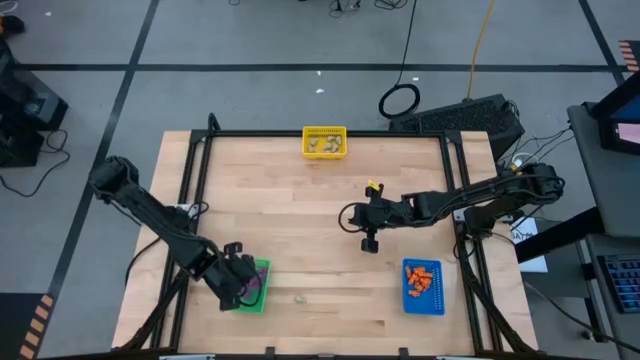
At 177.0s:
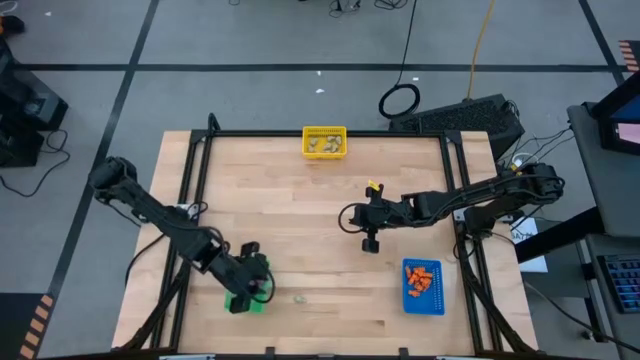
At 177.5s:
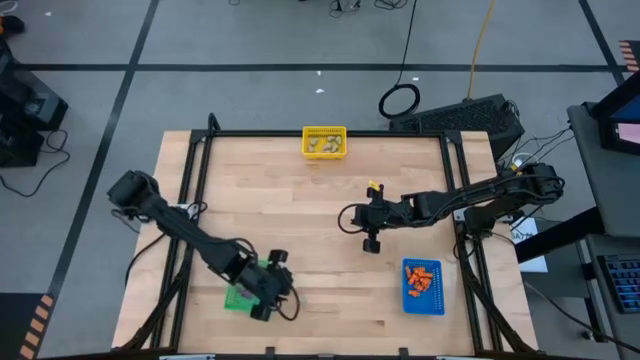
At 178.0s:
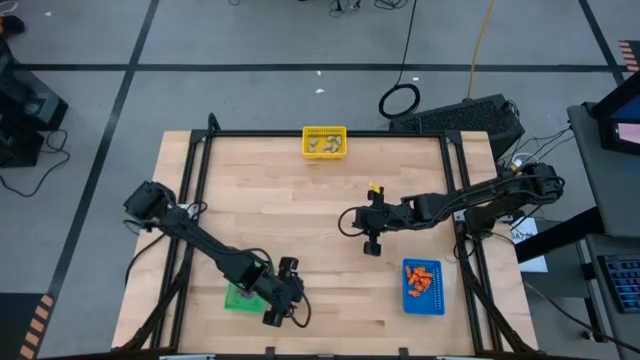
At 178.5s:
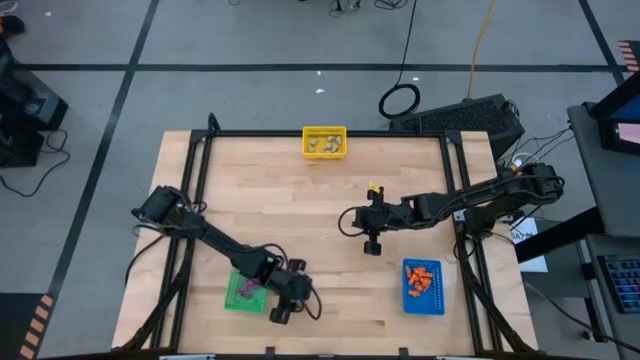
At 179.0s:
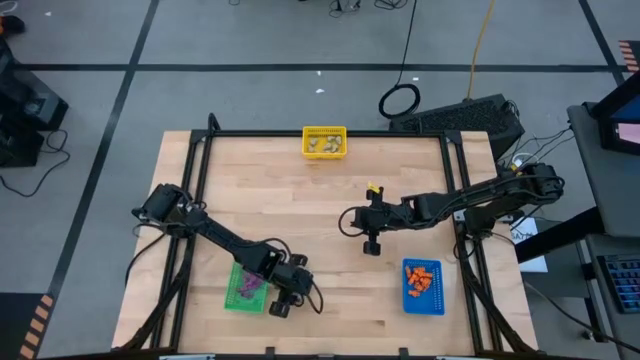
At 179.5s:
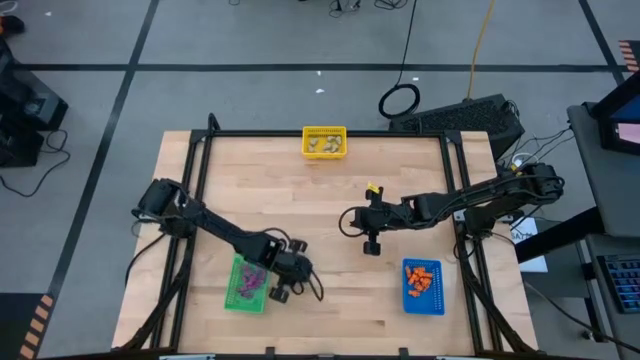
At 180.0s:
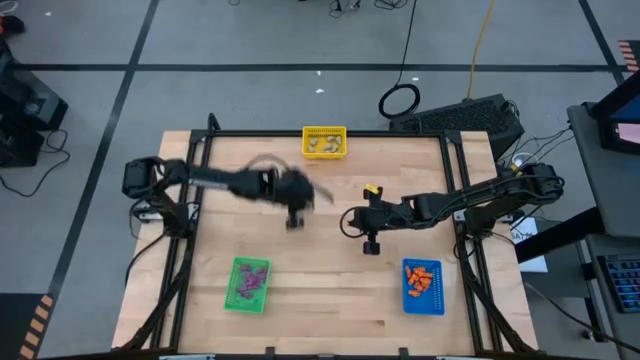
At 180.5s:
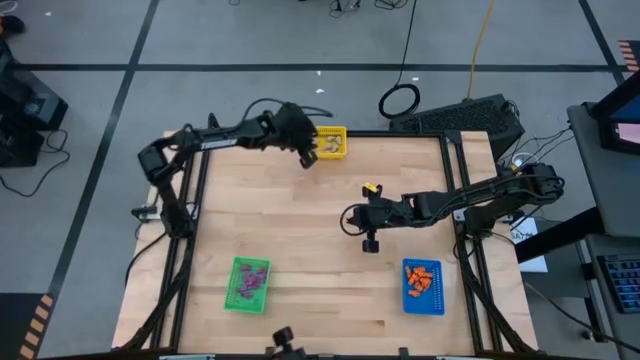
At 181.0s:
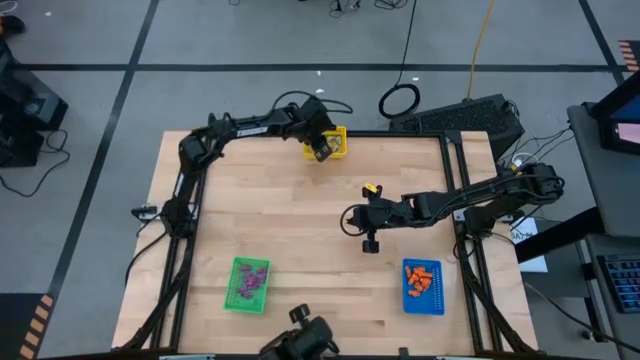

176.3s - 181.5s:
Task: Sort Halloween decoration
Put the gray skull toy into the yellow bin

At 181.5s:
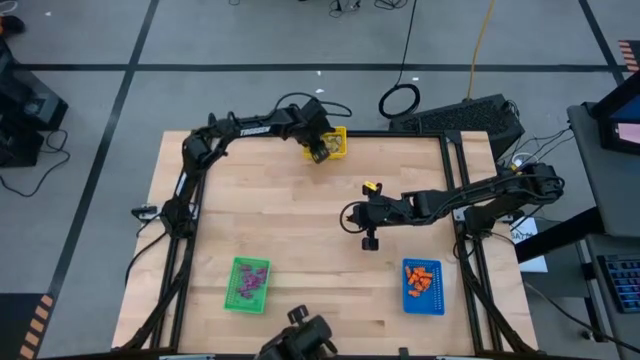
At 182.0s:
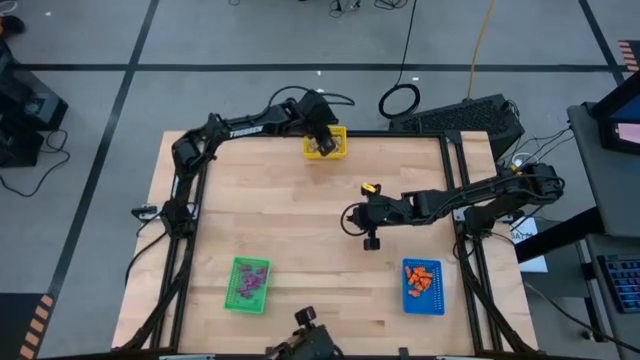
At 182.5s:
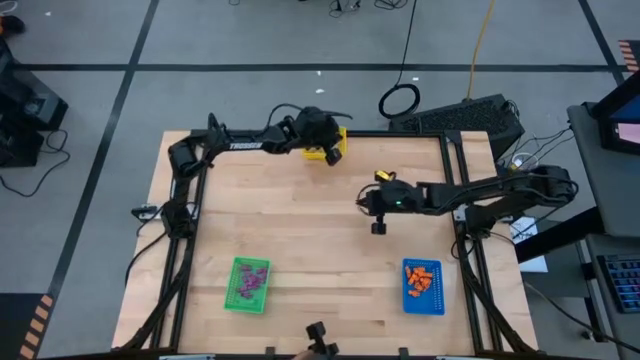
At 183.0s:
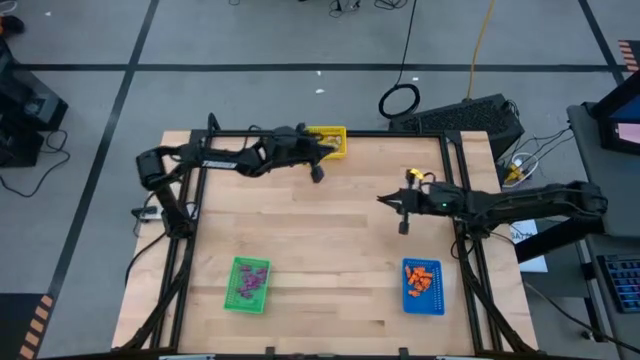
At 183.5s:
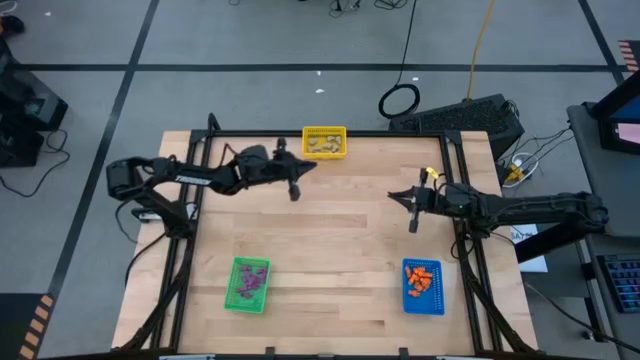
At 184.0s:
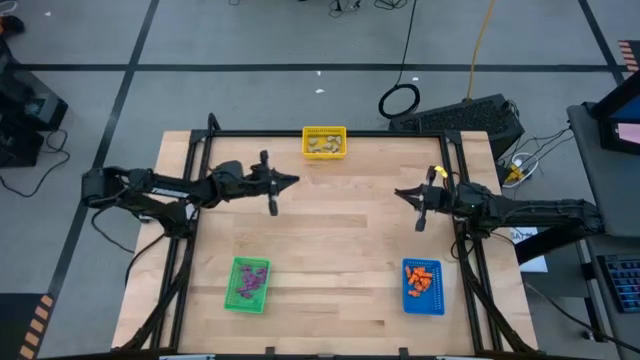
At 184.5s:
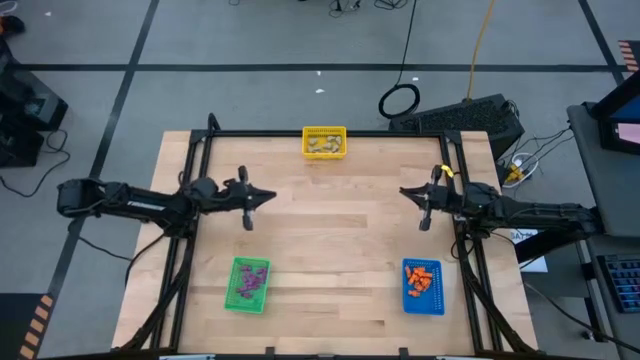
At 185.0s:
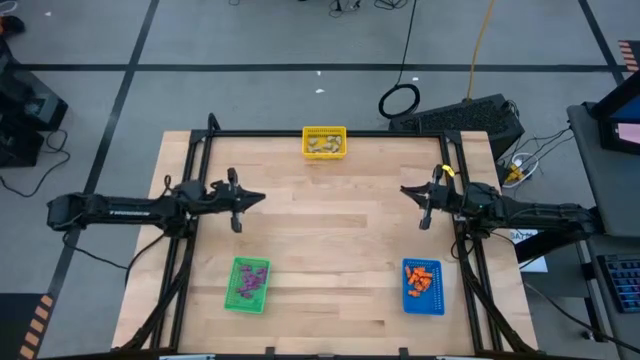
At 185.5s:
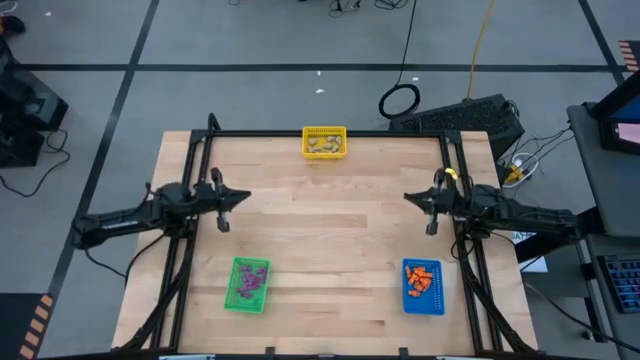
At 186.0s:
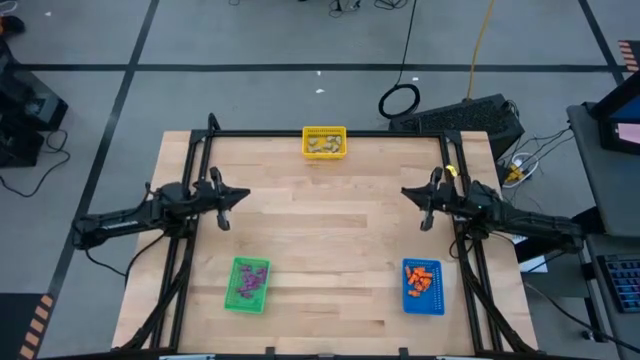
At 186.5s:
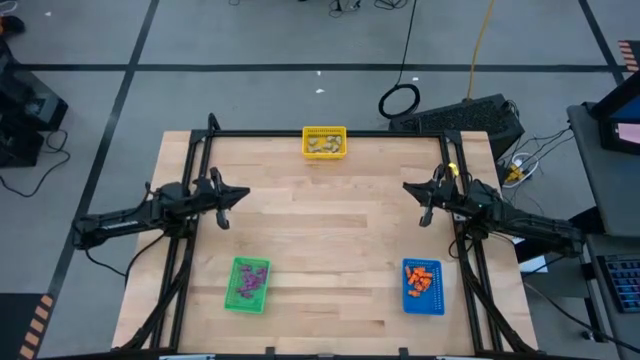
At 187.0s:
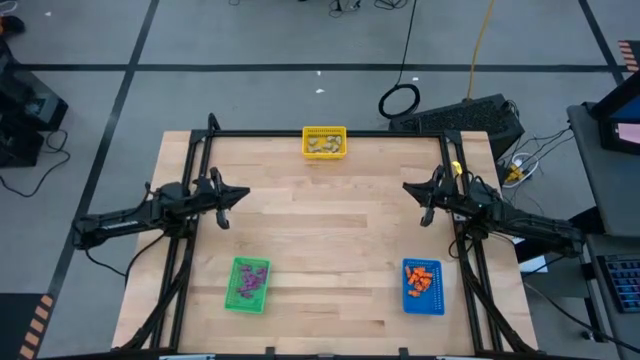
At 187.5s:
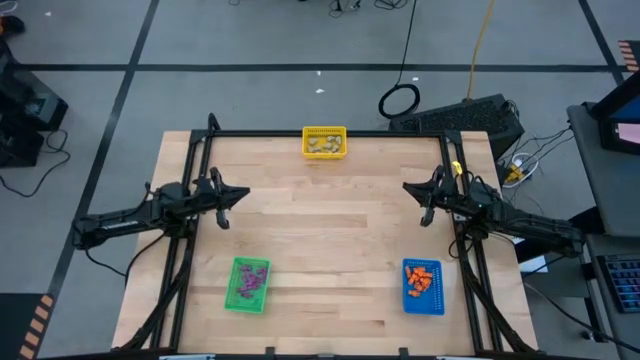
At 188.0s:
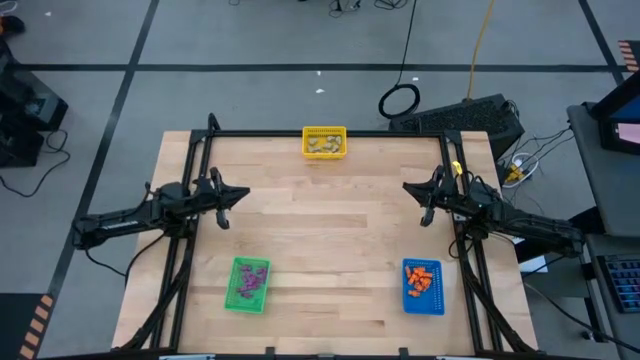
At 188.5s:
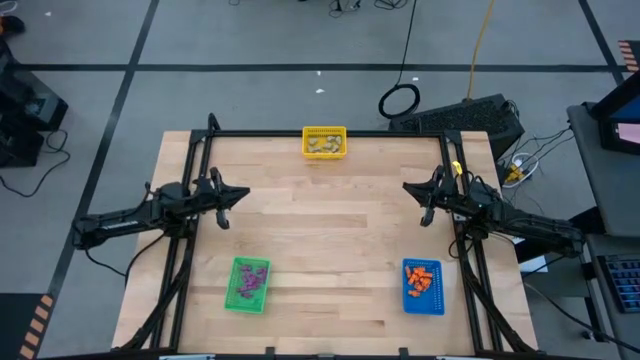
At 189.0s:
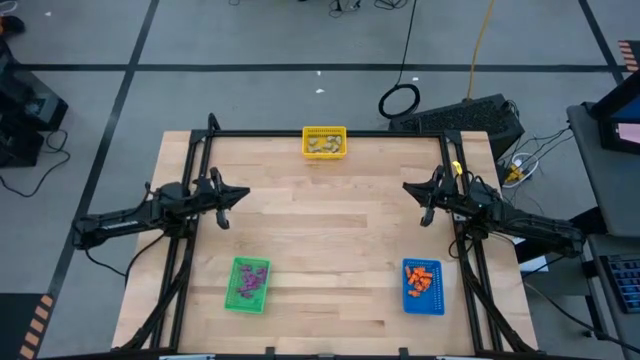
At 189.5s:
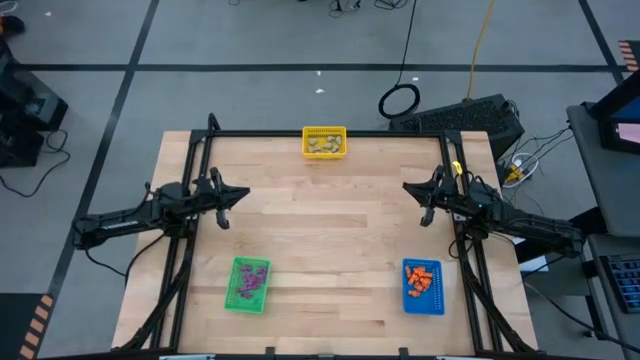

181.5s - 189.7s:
Return to Home Position

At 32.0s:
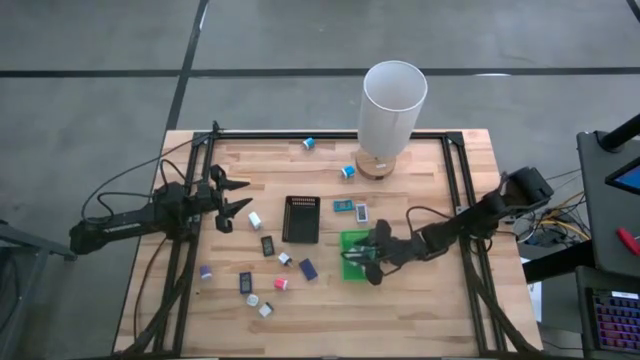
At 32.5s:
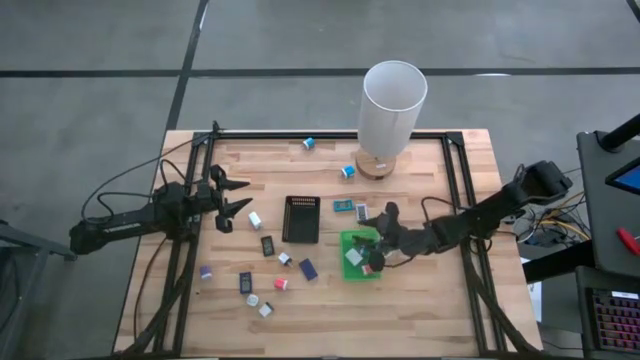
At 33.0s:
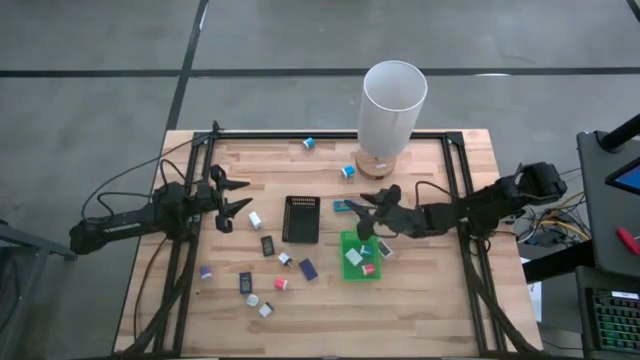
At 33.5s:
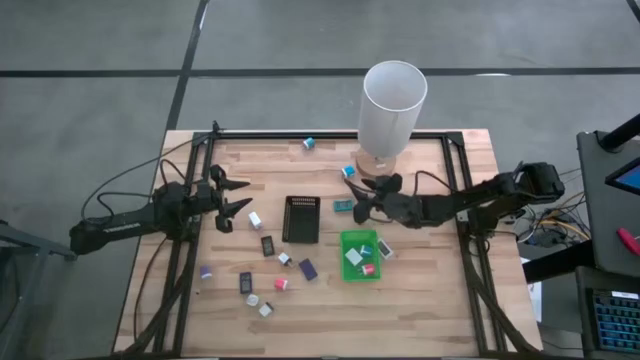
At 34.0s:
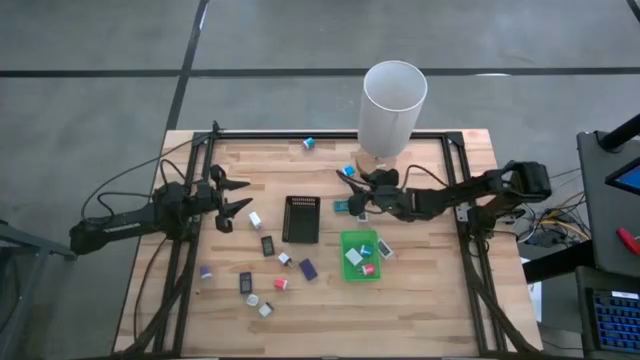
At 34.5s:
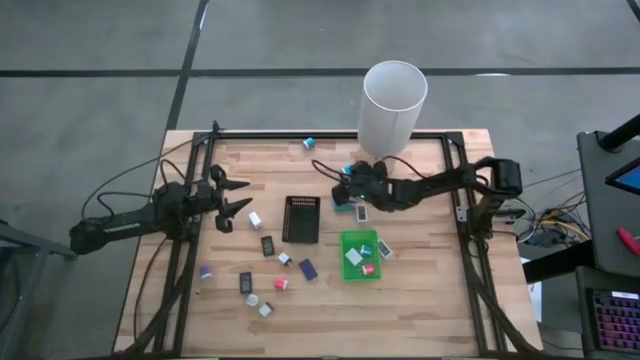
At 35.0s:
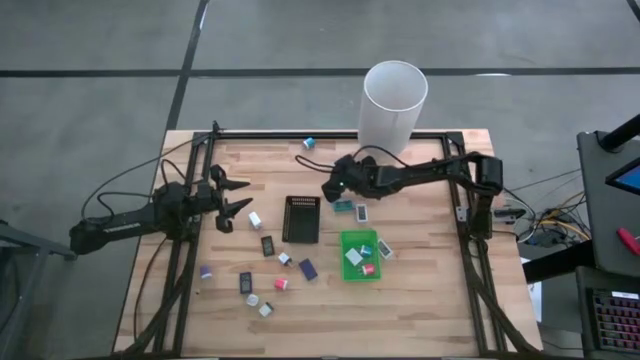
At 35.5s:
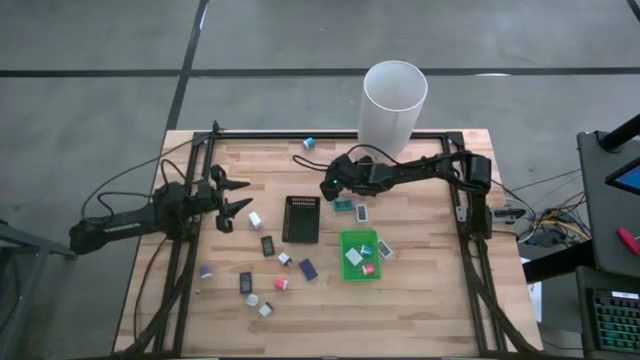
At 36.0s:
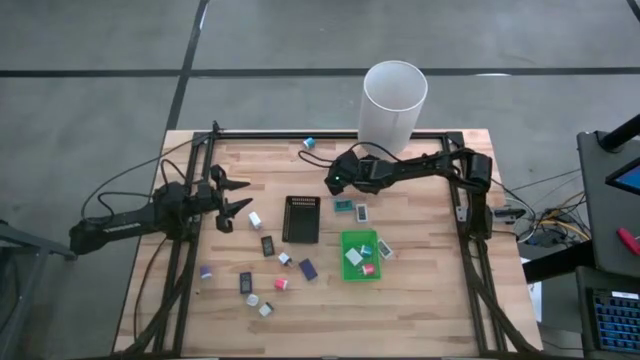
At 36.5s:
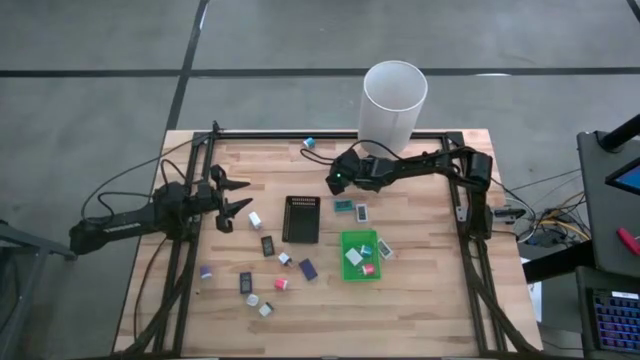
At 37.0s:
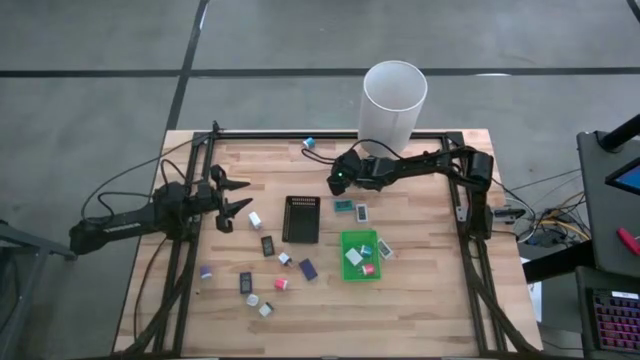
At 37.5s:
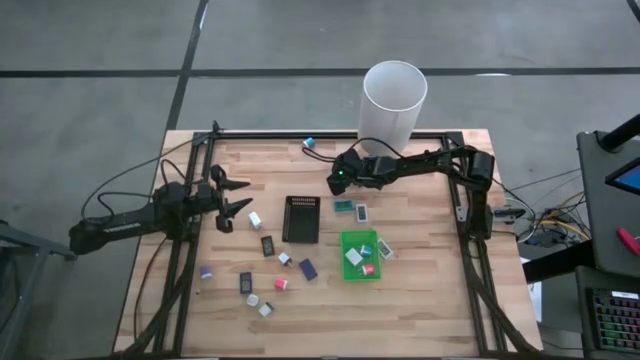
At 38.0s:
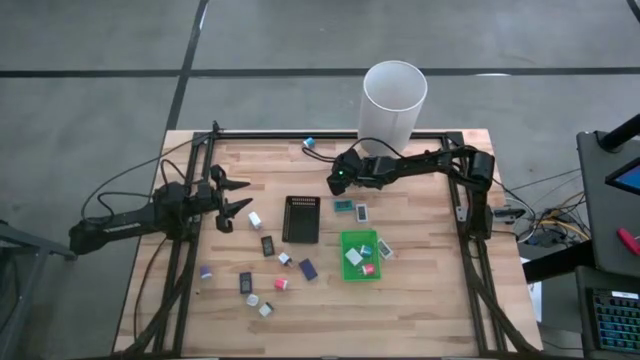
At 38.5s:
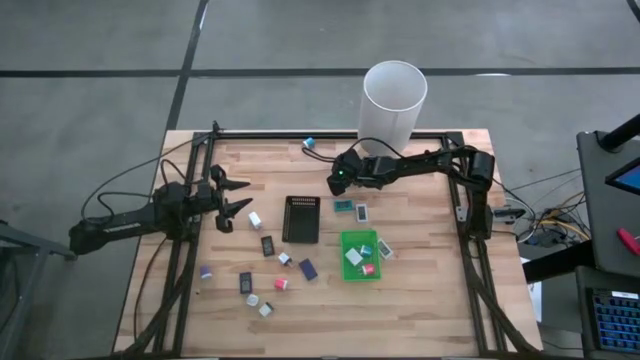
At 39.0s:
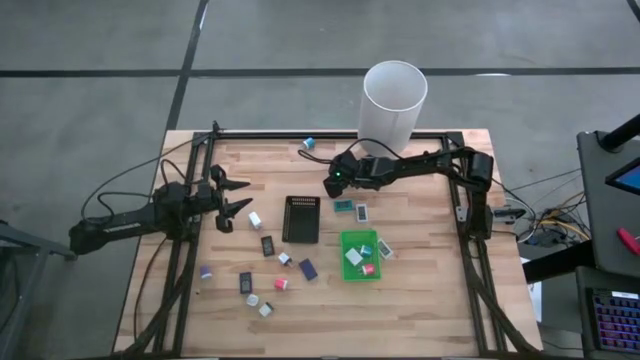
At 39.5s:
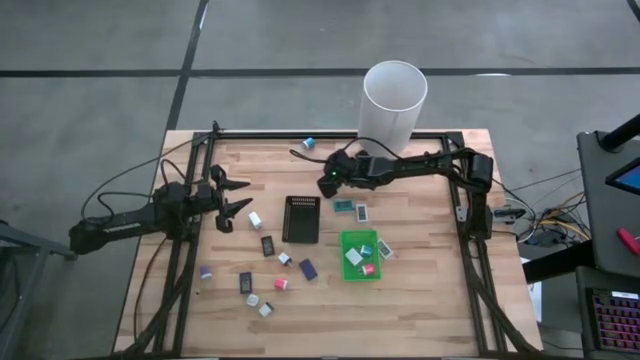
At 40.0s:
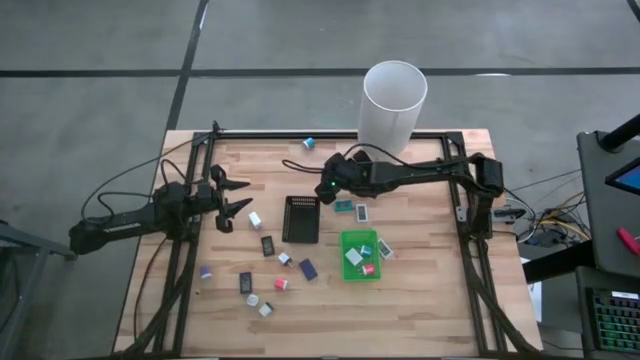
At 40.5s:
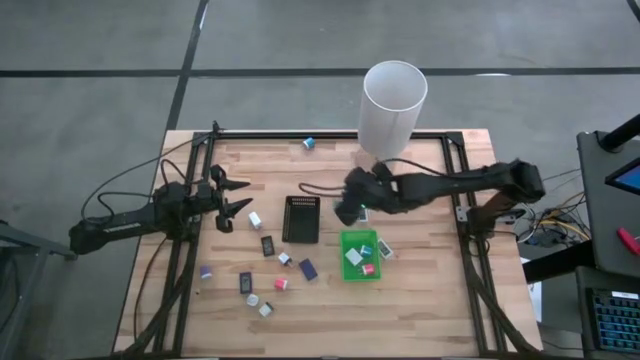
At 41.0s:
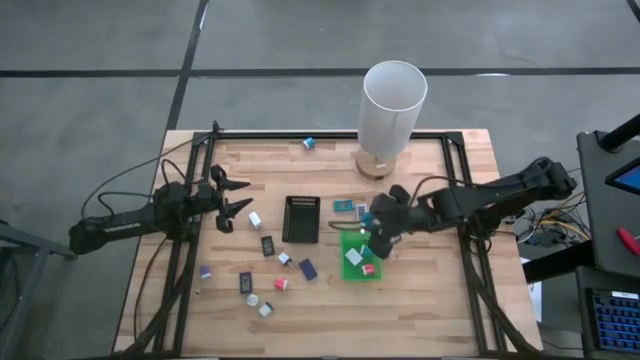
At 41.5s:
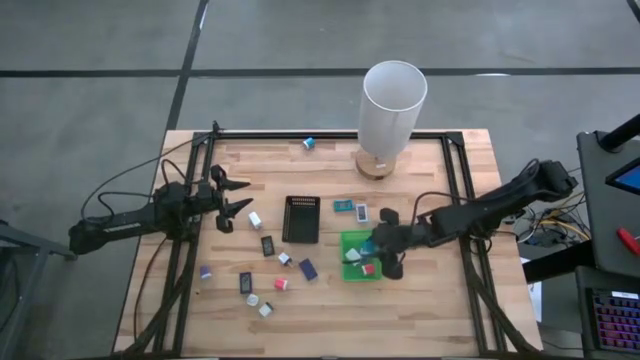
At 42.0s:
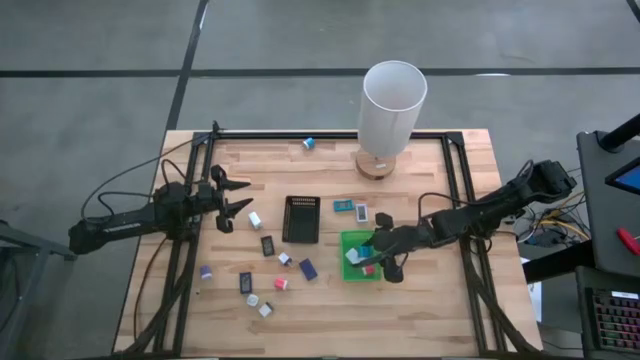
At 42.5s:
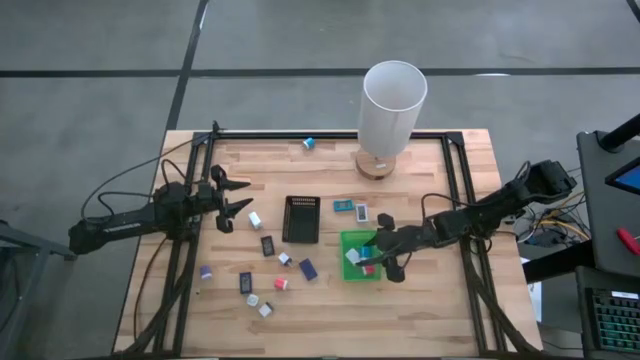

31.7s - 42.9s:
Task: Pick & Place Office items
Put the bottom blue charger adapter into the green bin
